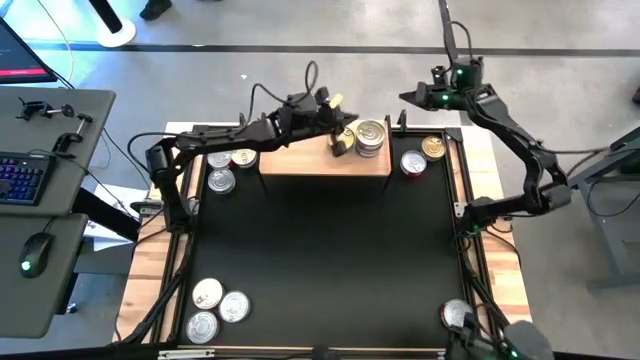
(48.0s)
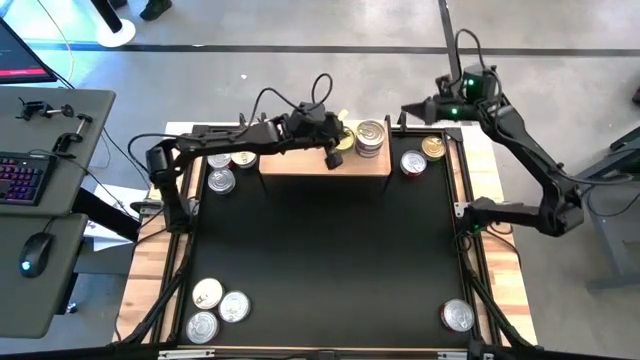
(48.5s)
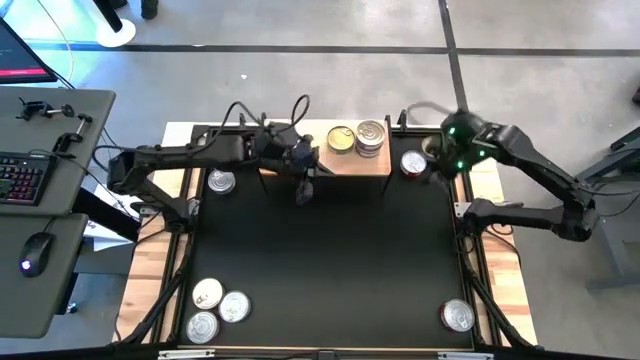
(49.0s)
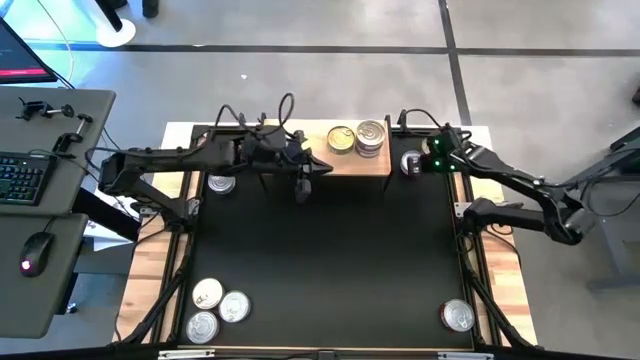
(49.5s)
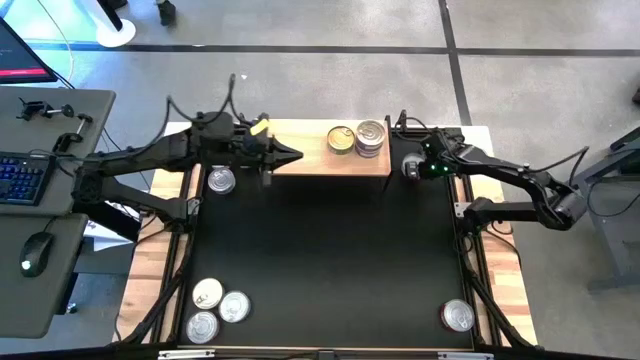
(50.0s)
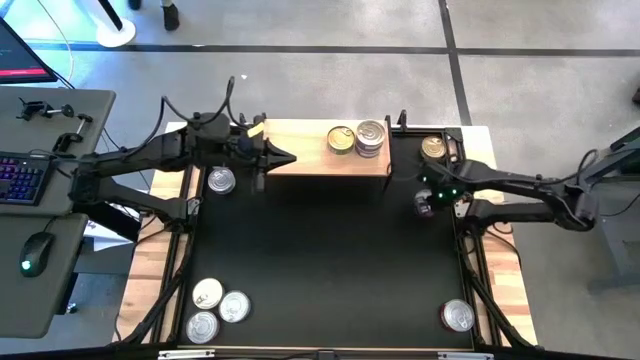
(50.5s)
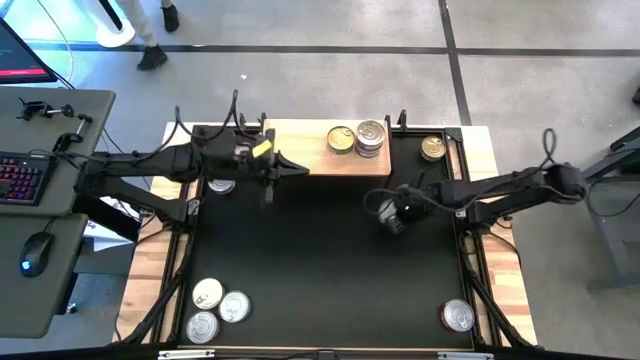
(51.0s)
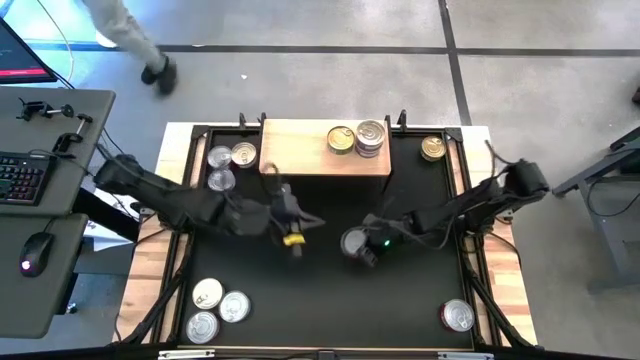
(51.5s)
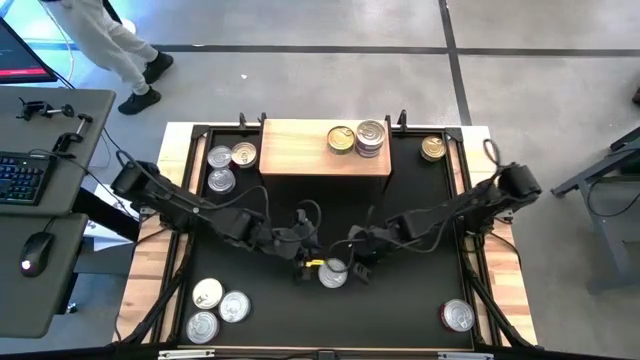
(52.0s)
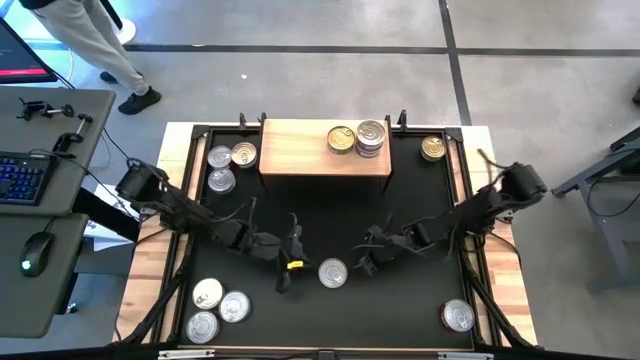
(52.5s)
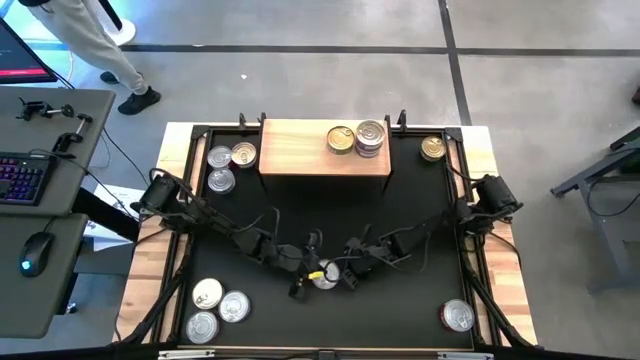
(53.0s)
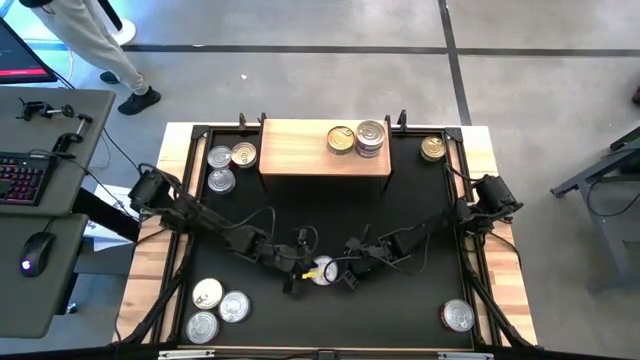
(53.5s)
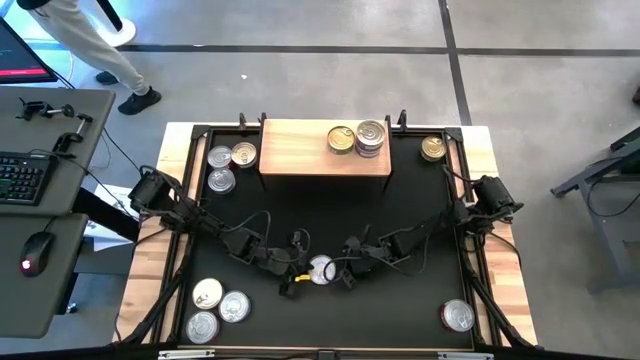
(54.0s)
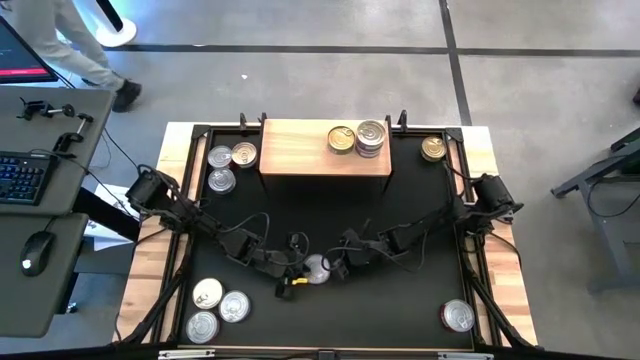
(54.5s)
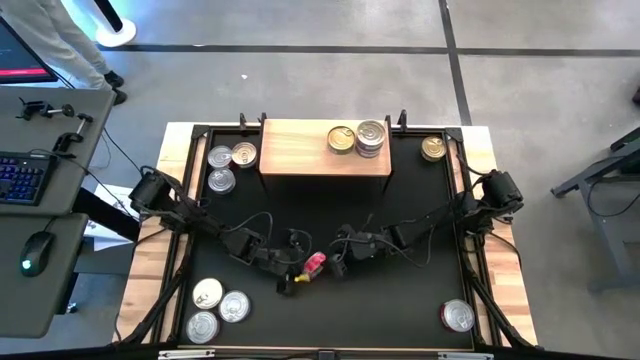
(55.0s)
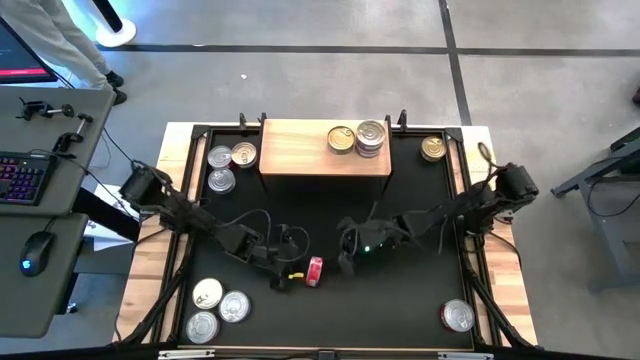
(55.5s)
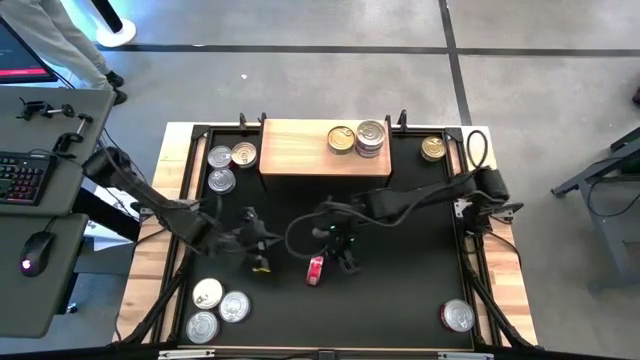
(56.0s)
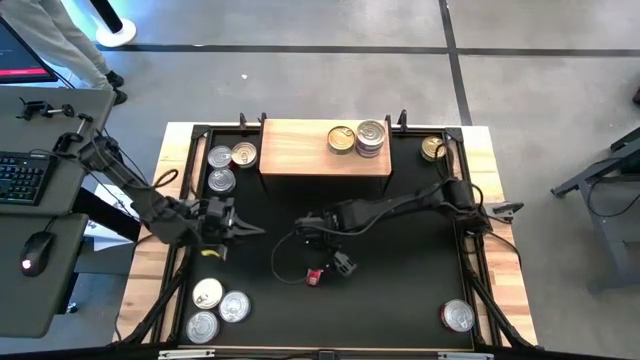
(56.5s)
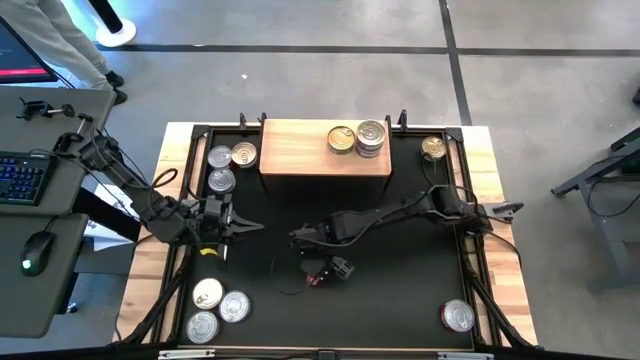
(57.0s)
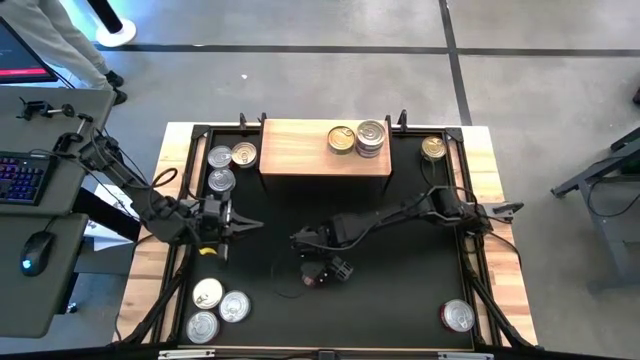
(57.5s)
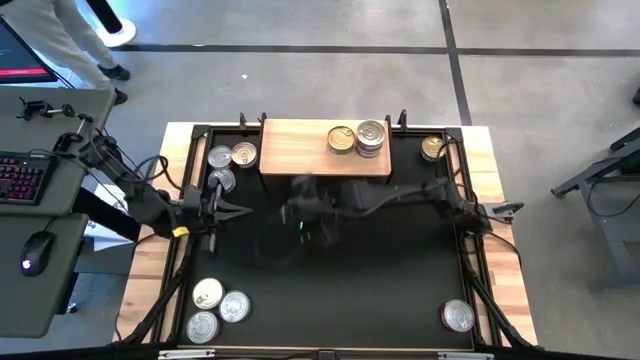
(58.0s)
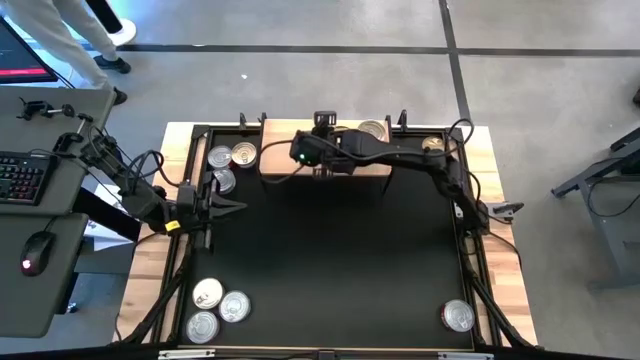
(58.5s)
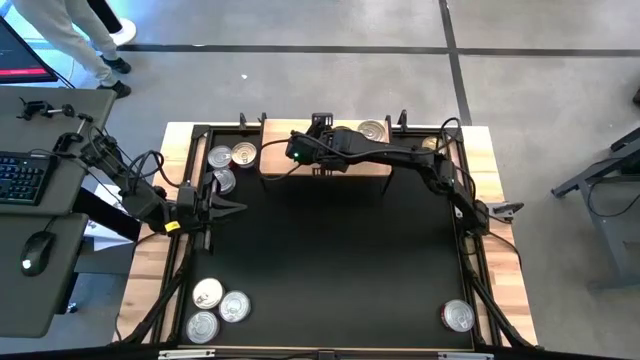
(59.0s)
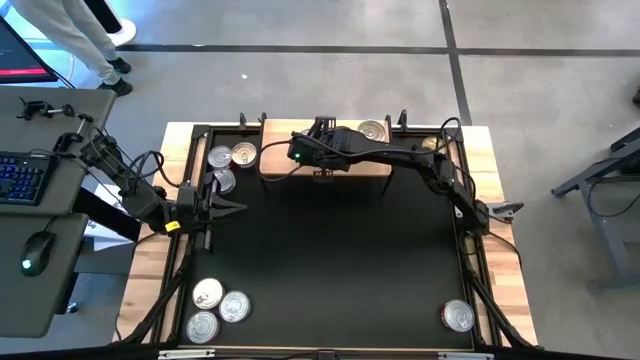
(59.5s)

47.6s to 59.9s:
Task: Stack canned seafood by type on shelf
Put the top right red tuna can on the shelf

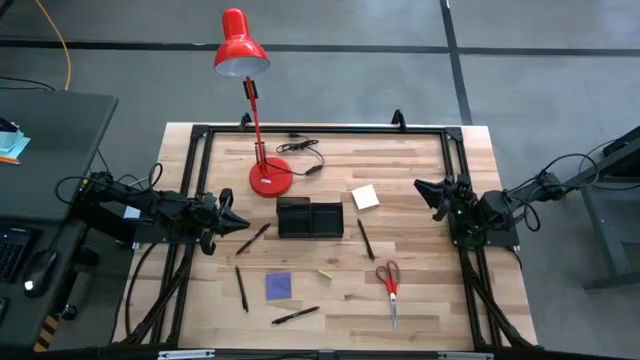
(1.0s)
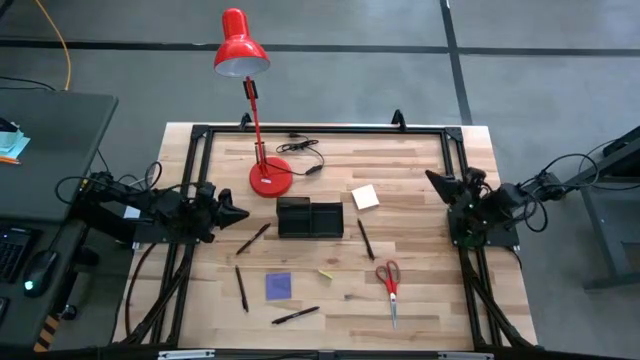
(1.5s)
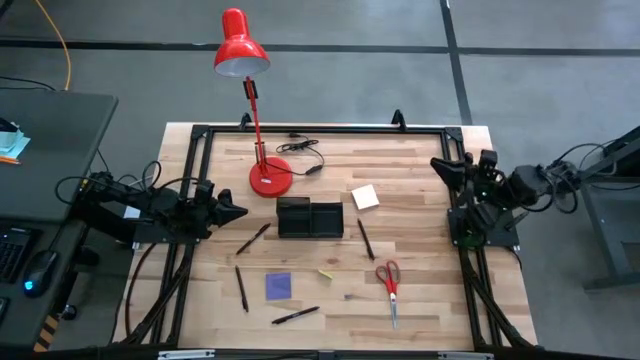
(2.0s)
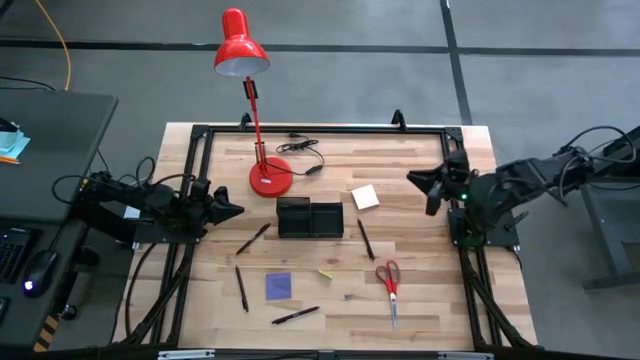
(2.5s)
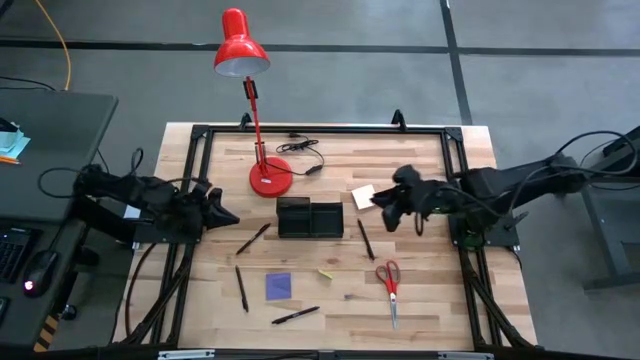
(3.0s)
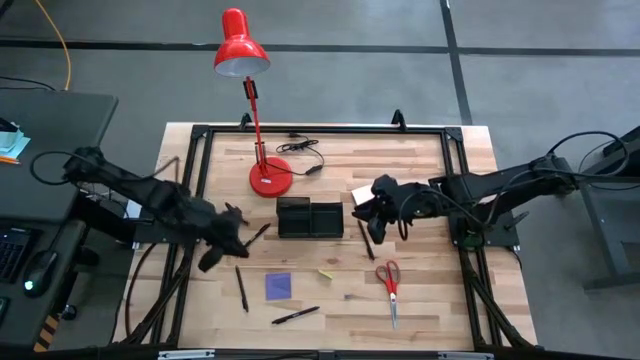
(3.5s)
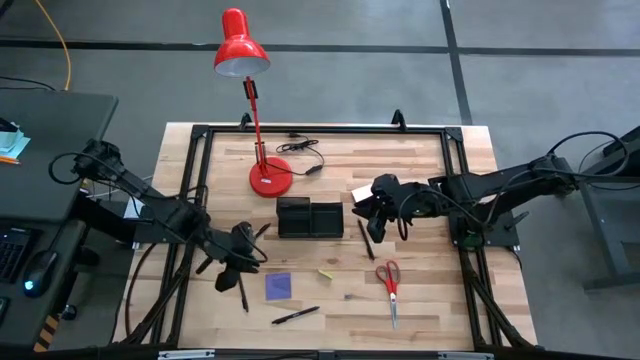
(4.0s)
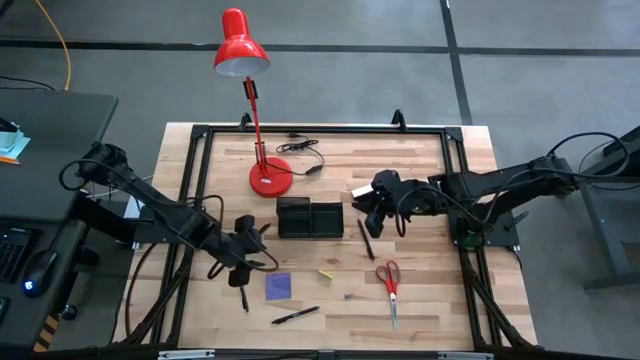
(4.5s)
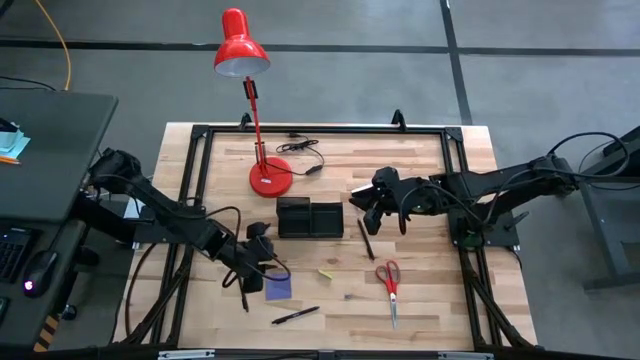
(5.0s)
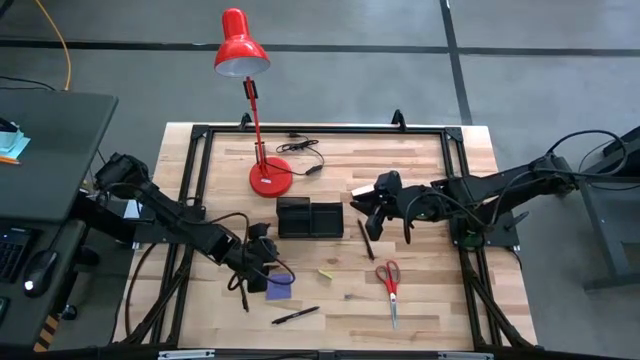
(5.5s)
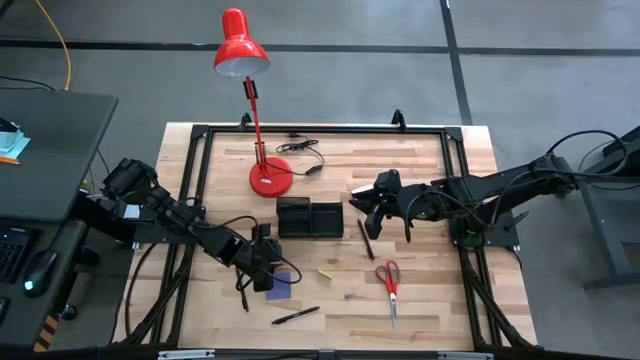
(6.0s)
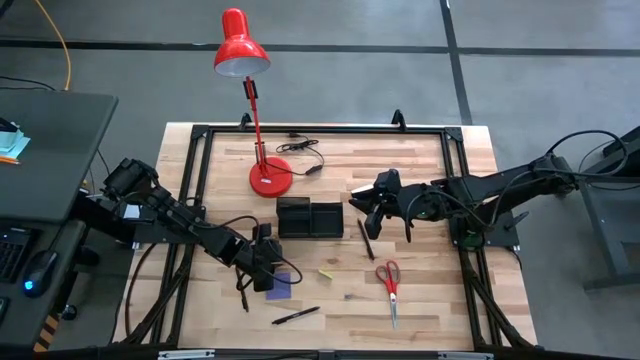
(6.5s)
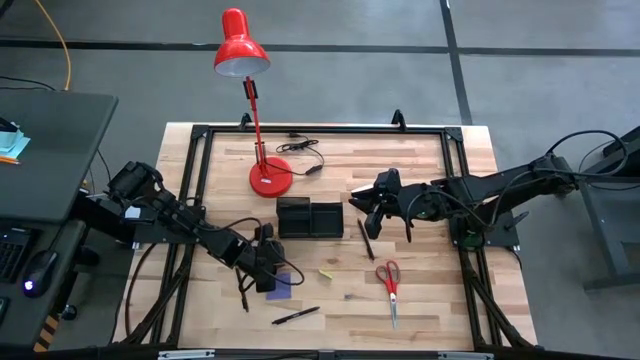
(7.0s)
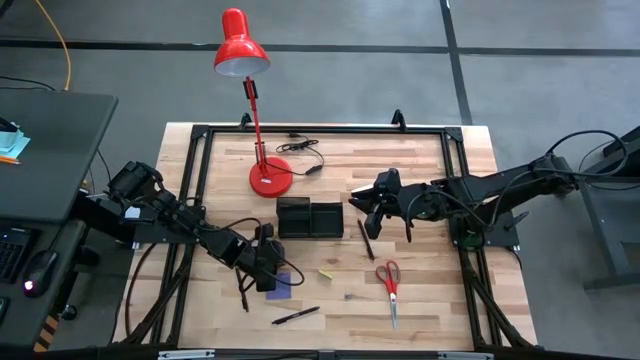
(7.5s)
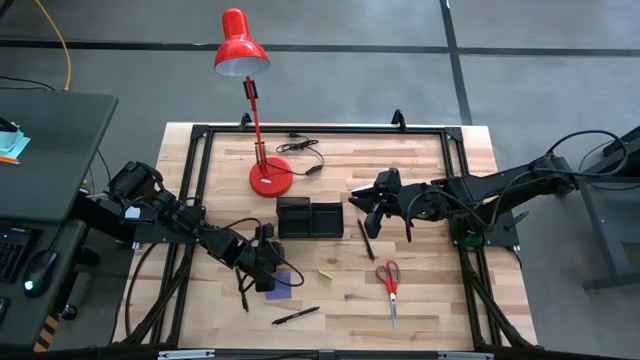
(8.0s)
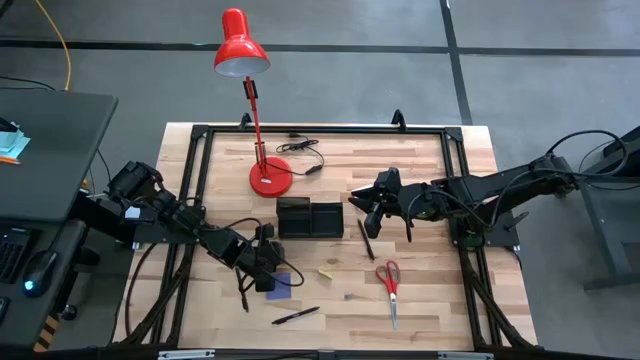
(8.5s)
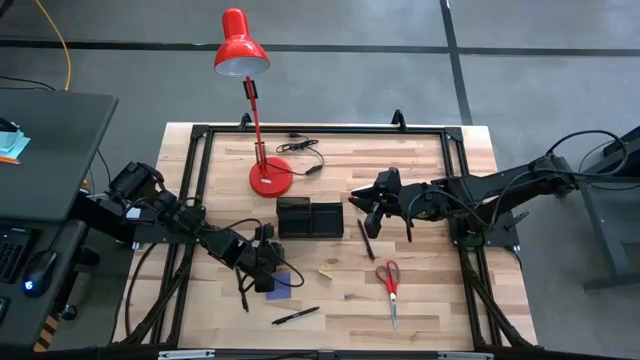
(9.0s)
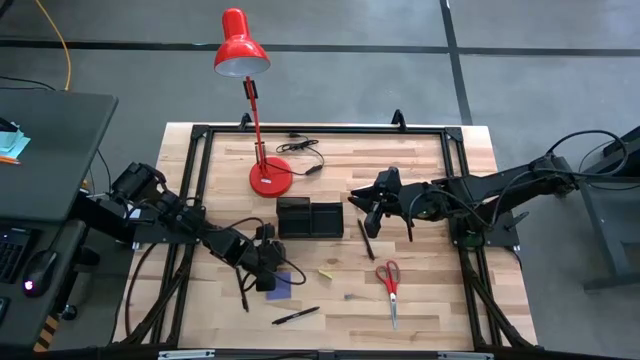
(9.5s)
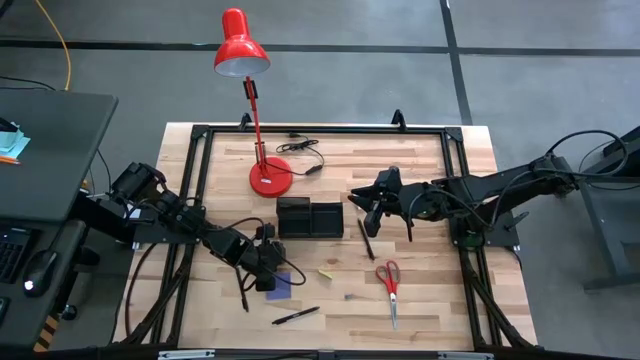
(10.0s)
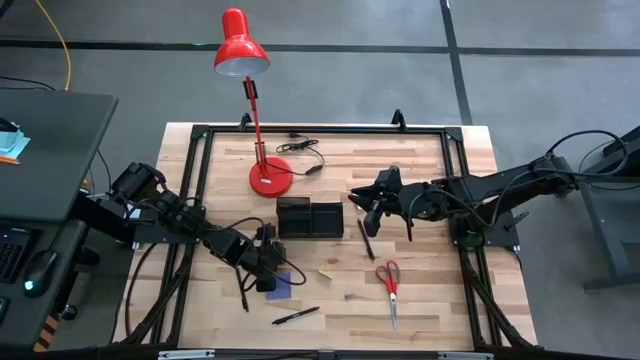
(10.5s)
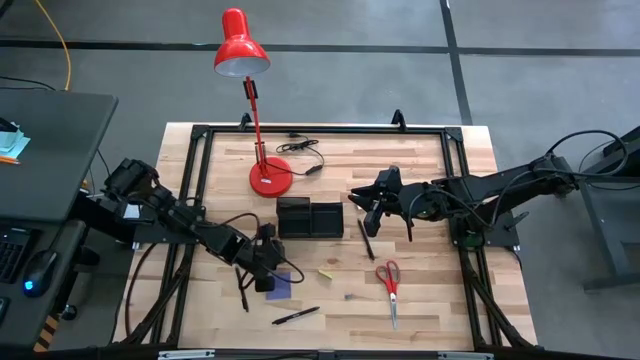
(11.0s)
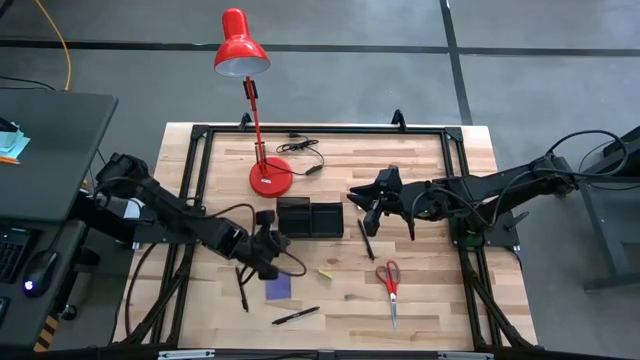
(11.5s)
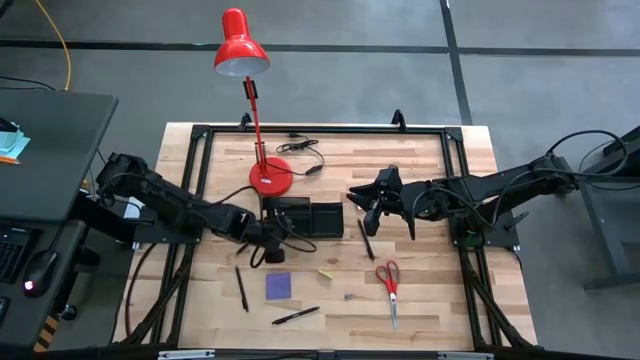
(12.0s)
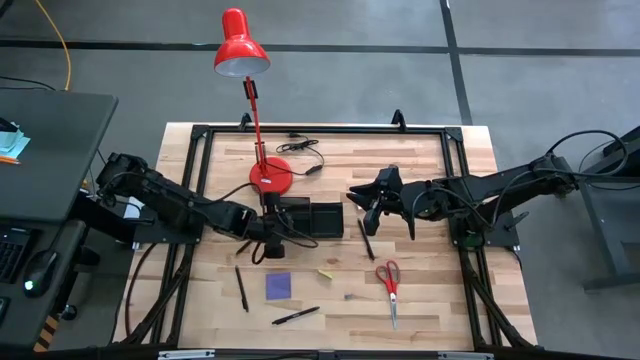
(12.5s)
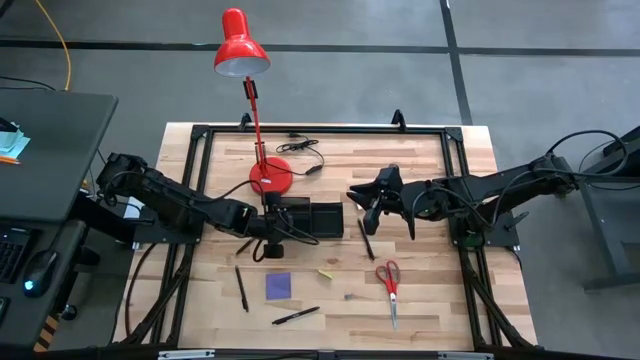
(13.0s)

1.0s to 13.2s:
Task: Pick and place office supplies into organizer
Put the pink binder clip into the desk organizer
